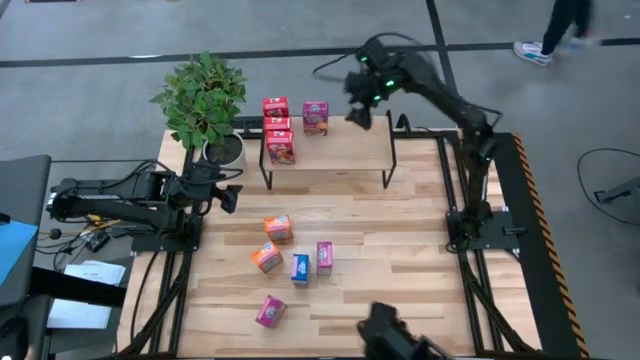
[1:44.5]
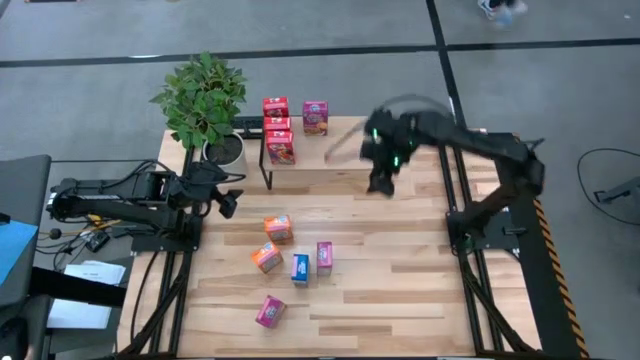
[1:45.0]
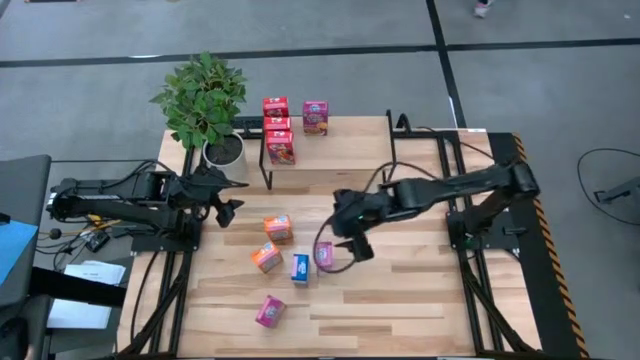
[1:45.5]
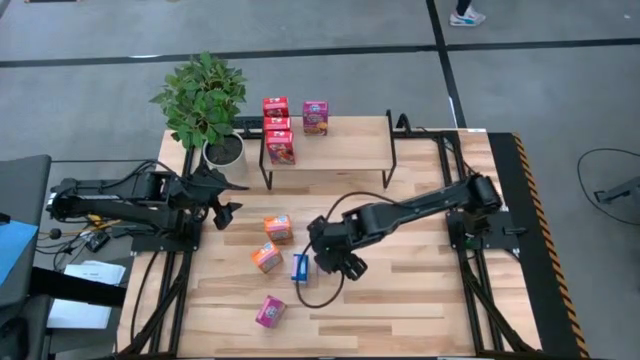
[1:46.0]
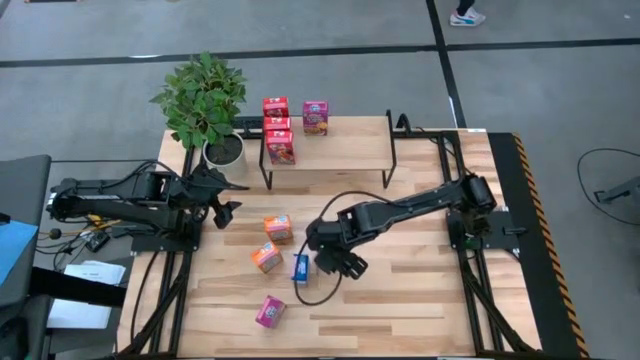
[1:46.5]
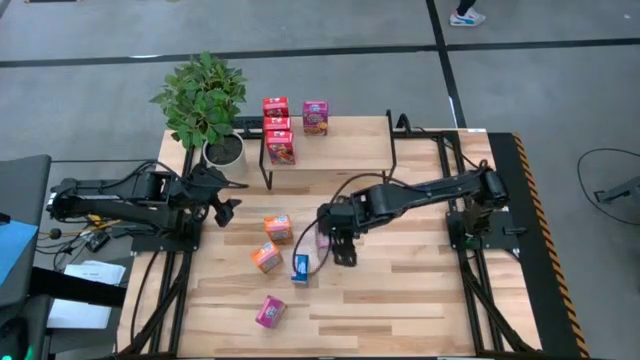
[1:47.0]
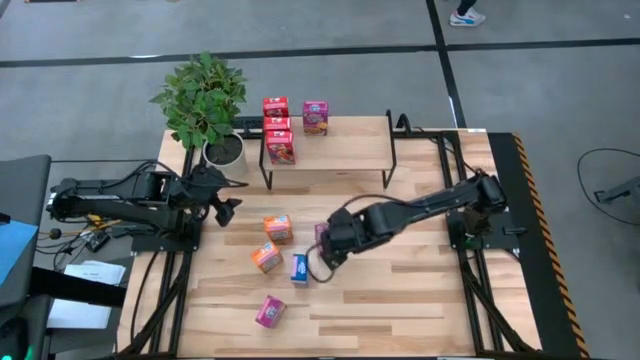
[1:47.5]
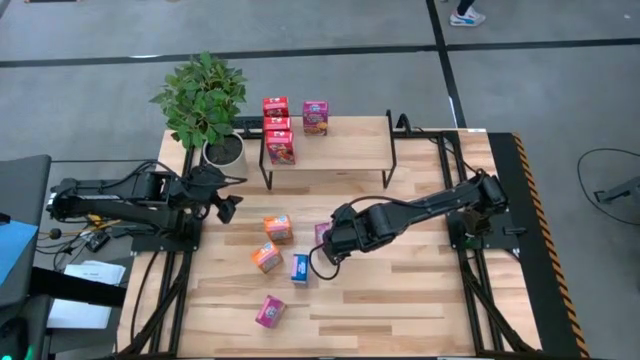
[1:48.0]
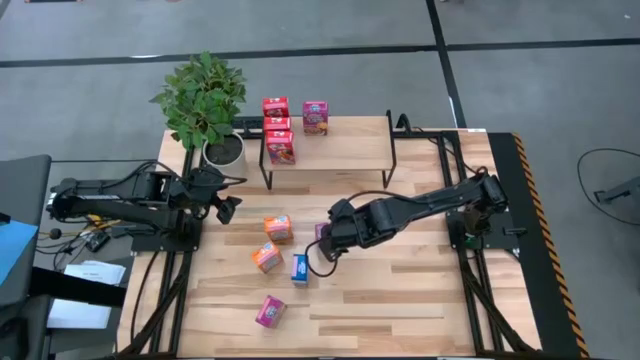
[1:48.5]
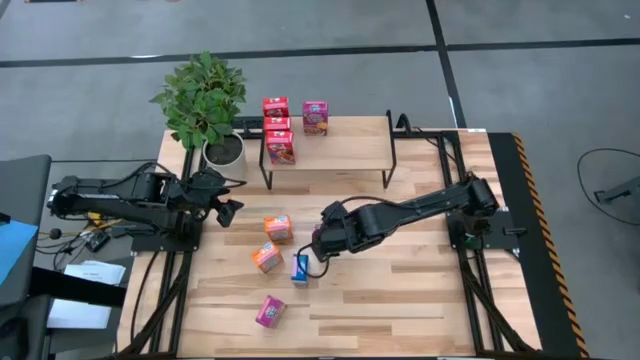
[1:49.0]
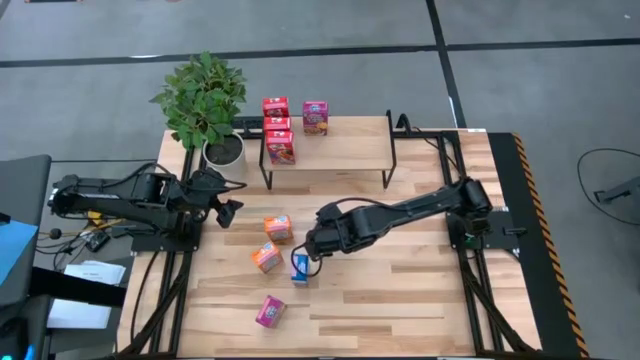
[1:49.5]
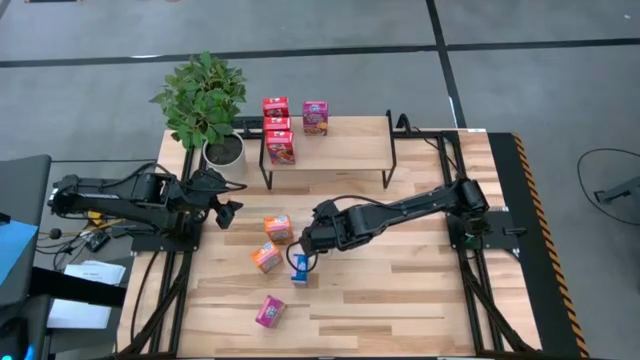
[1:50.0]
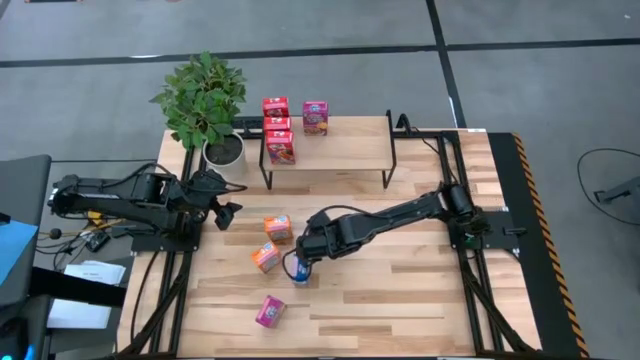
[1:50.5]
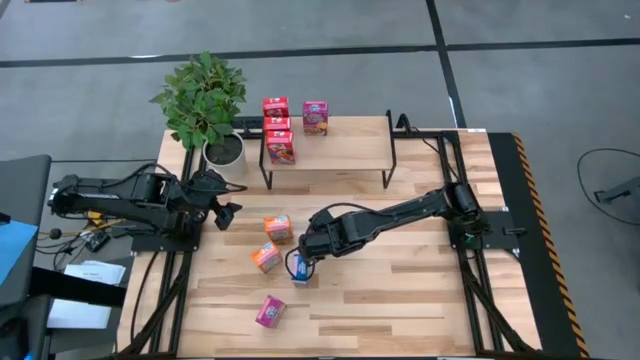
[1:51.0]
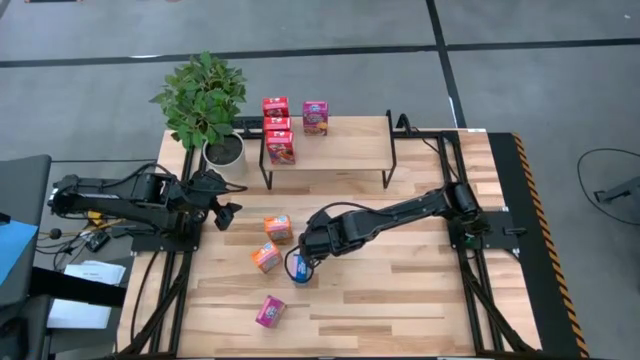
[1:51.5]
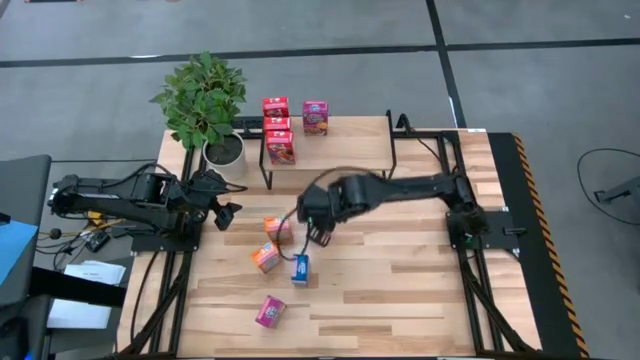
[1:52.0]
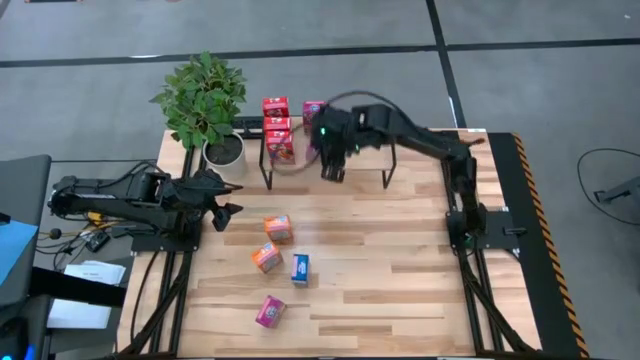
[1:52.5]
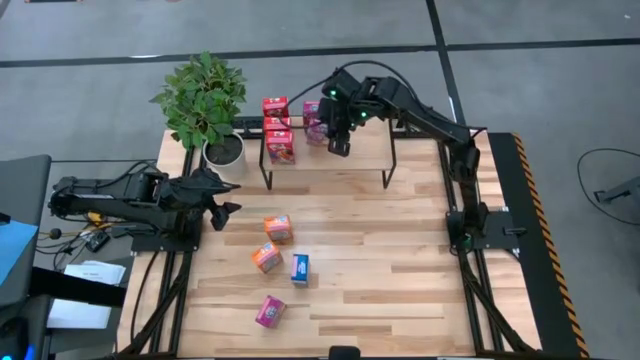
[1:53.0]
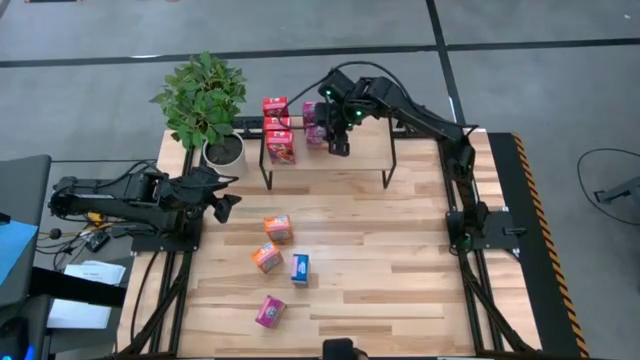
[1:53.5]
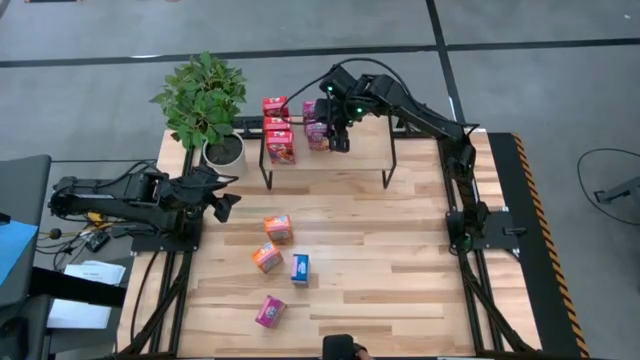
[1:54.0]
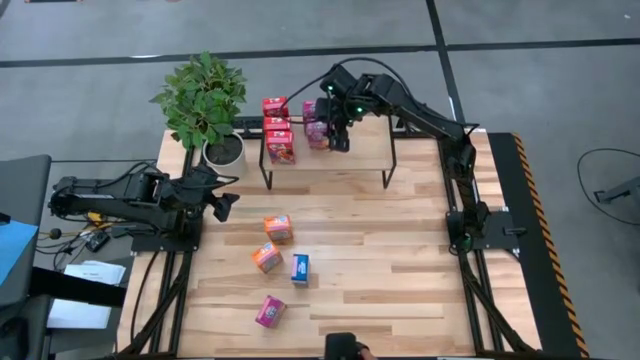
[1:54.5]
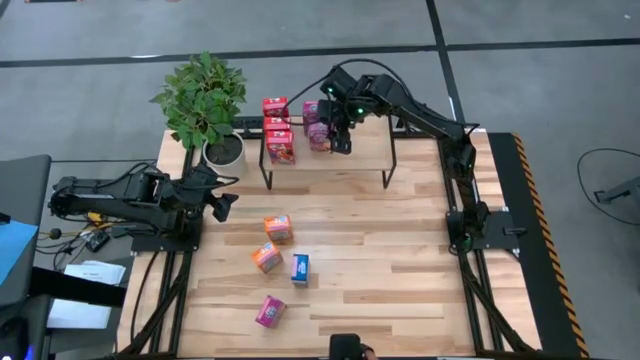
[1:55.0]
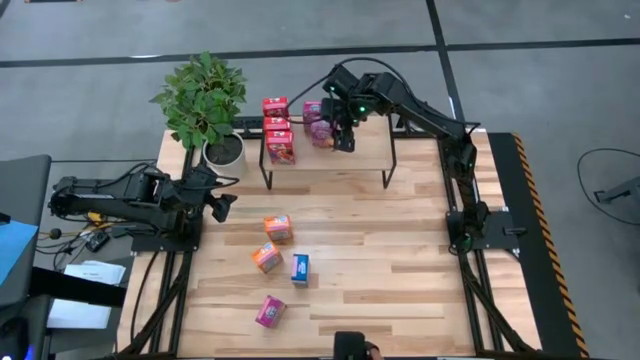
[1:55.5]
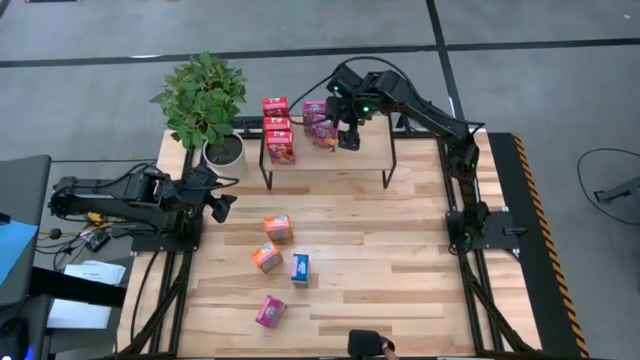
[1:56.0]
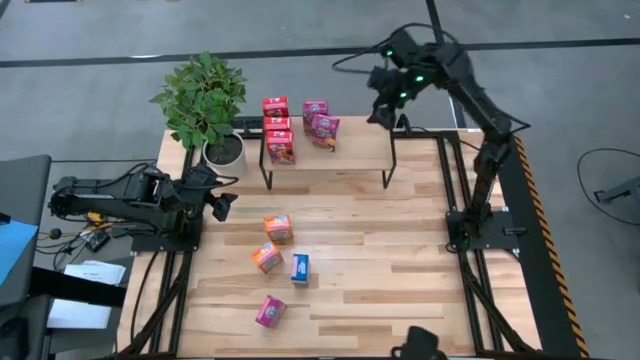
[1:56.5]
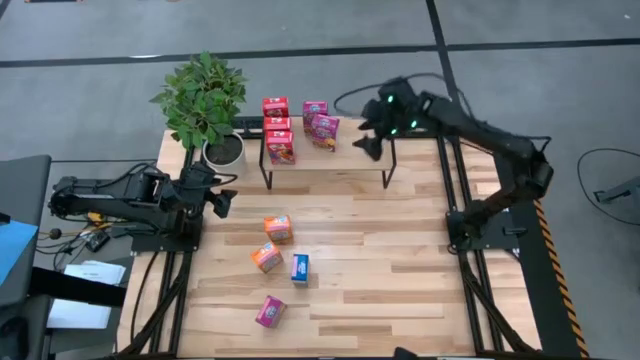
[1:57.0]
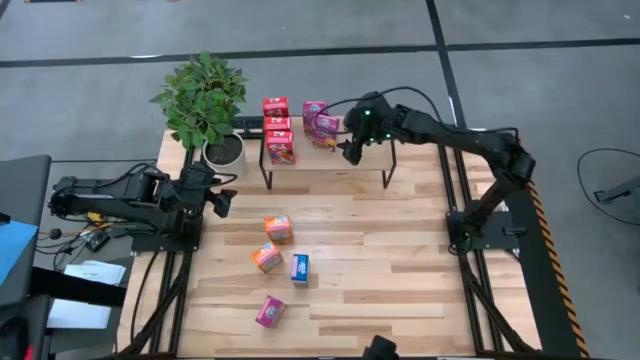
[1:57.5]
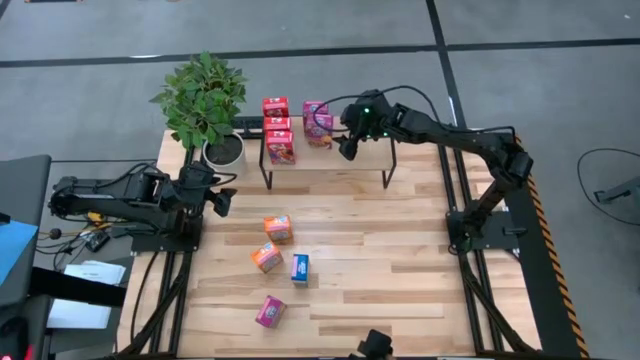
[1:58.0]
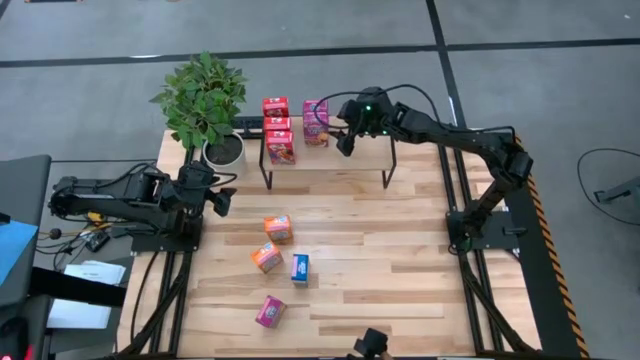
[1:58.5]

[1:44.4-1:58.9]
Task: Stack cereal on shelf
Put the top violet cereal box on the shelf aligned with the other violet cereal box on the shelf

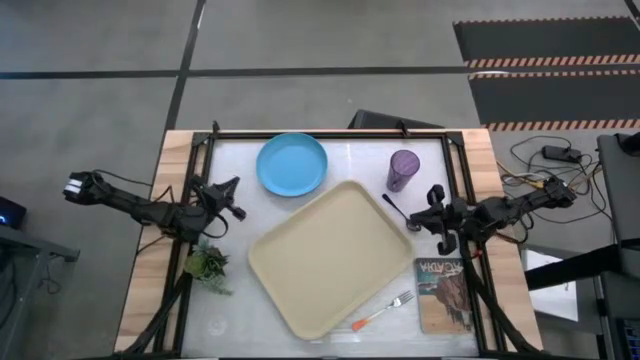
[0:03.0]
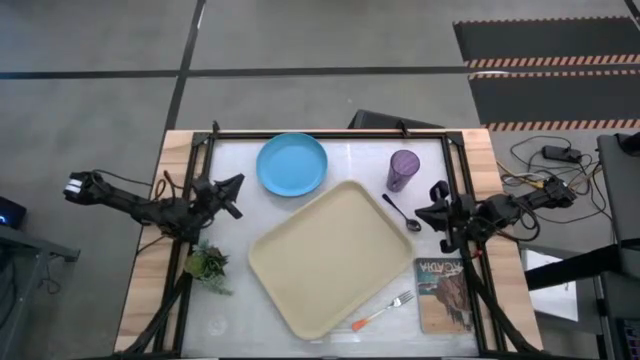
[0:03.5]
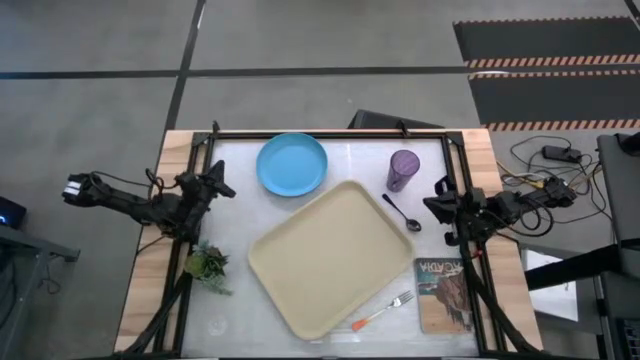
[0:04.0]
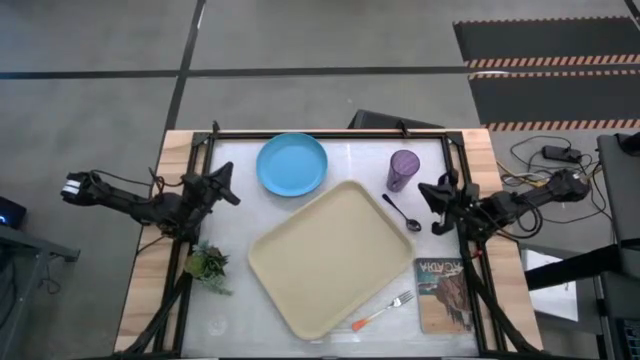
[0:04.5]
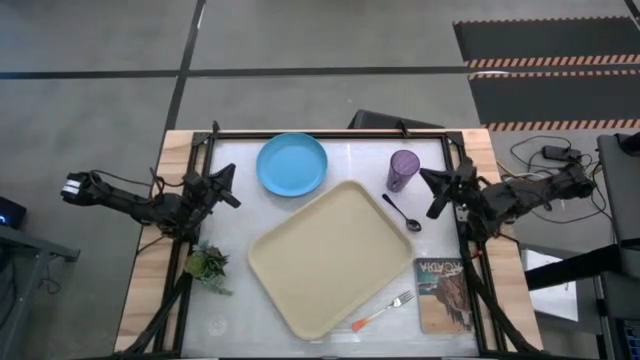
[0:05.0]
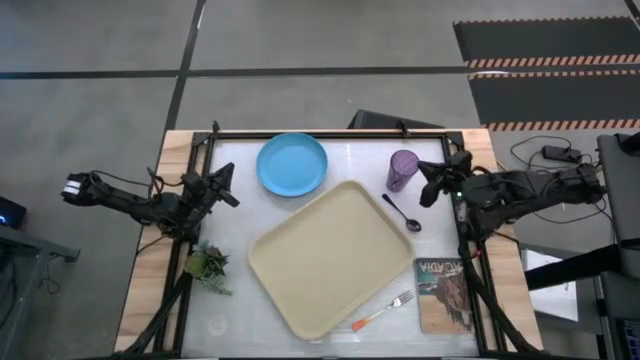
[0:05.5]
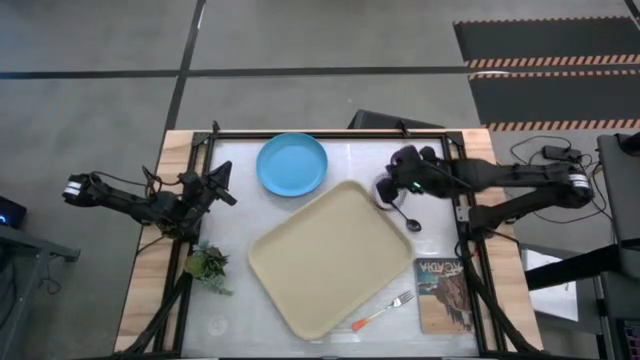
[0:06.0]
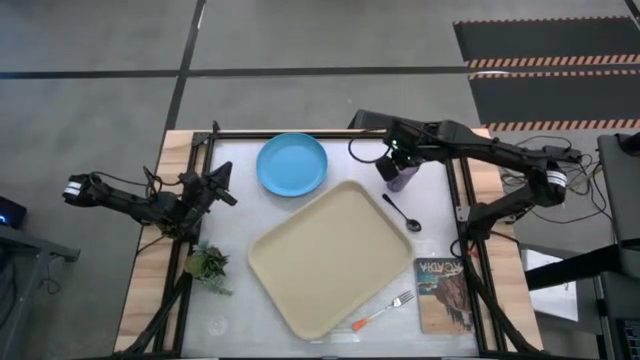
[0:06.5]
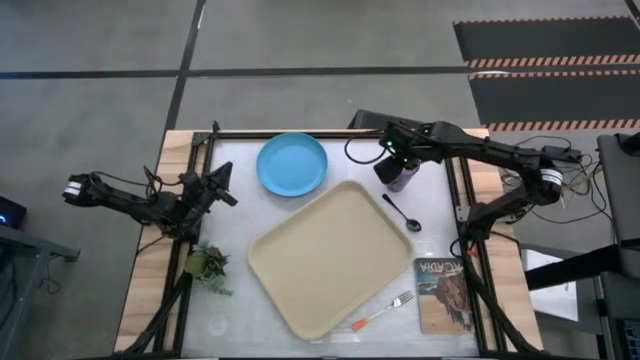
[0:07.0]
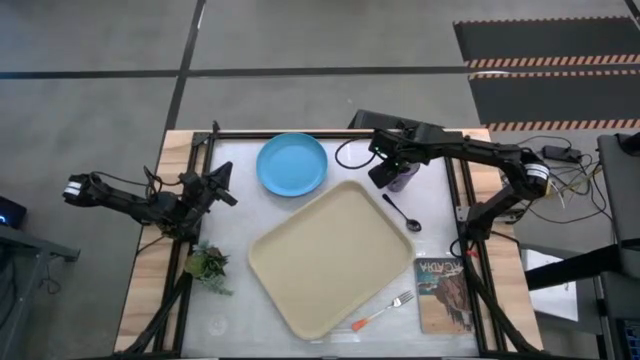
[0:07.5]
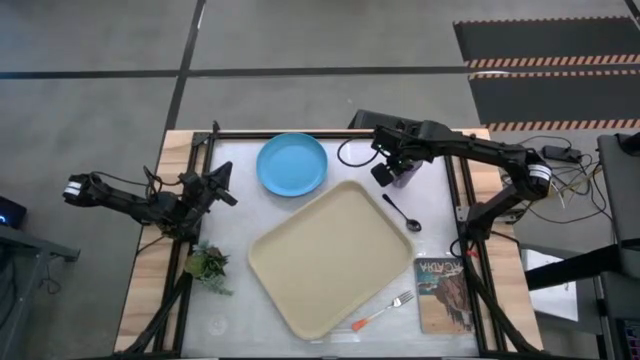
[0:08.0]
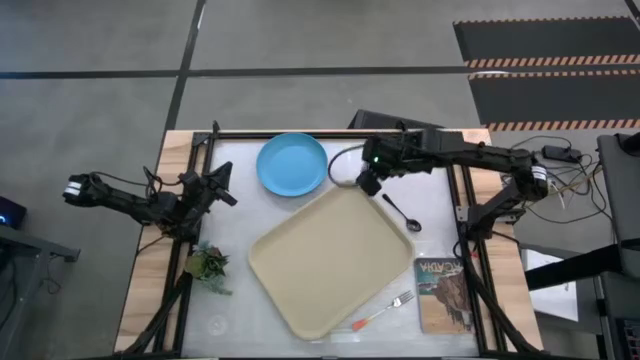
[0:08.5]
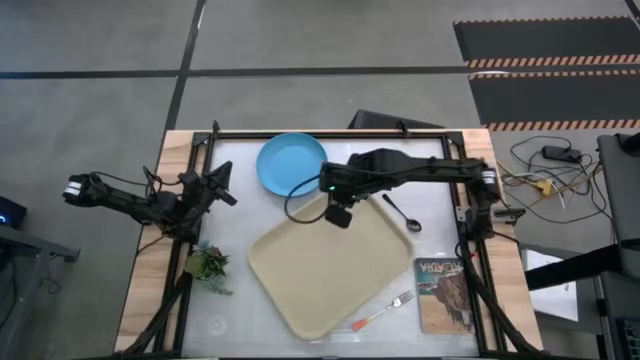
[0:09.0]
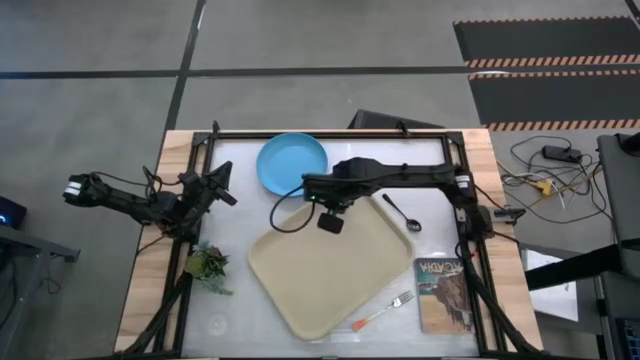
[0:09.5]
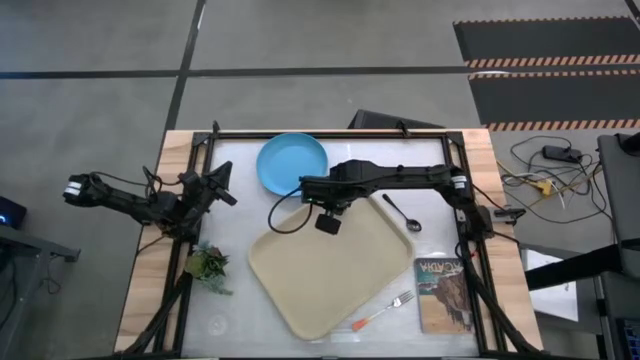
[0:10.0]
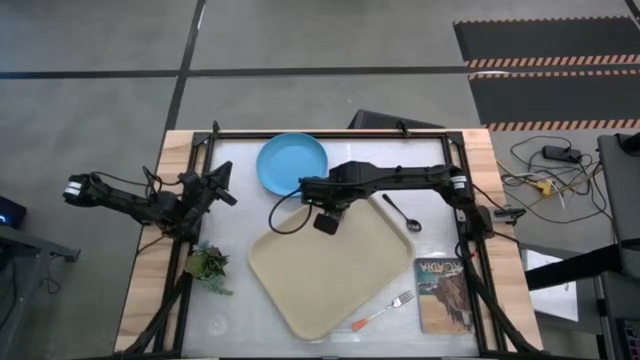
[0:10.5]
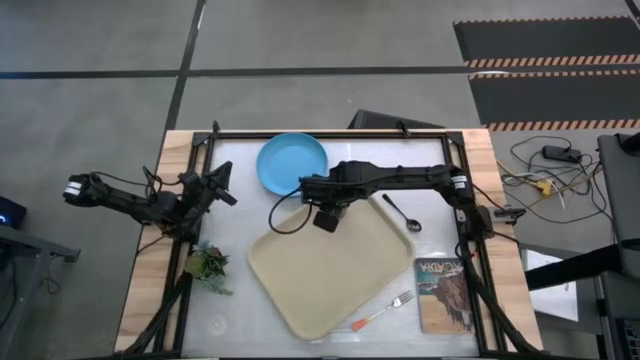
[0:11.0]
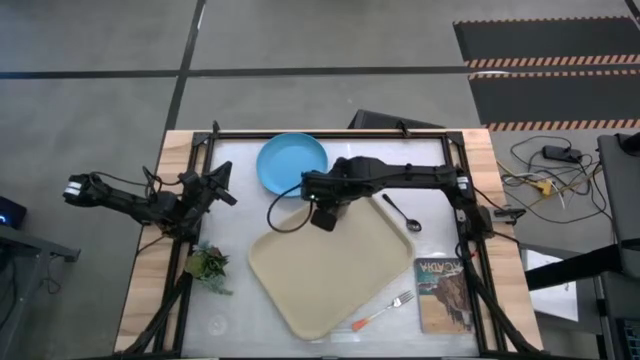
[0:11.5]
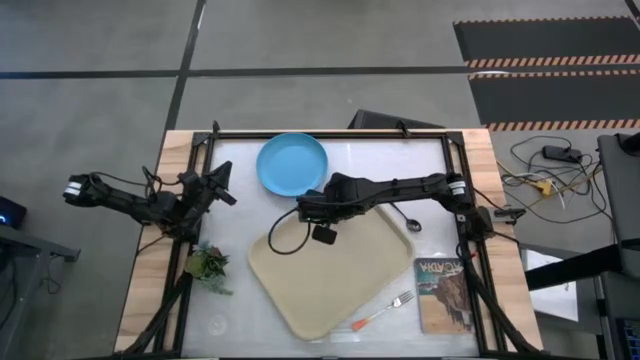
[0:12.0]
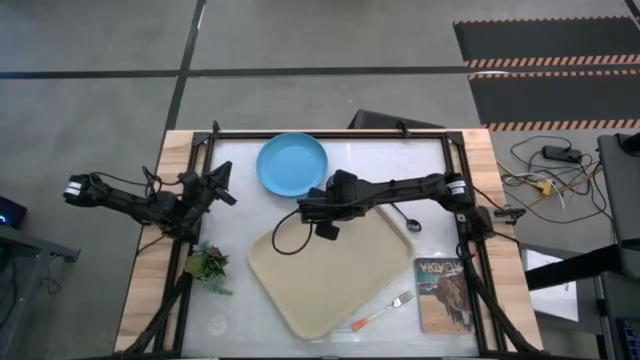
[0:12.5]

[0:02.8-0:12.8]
Task: Pick and place plate/cup/fork/spoon on tray
Put the violet glass on the light brown tray
